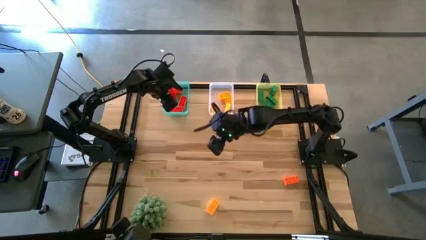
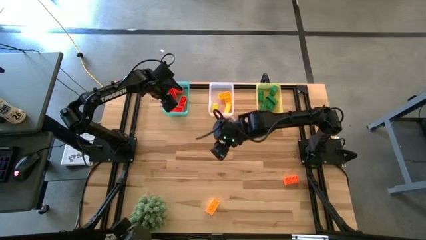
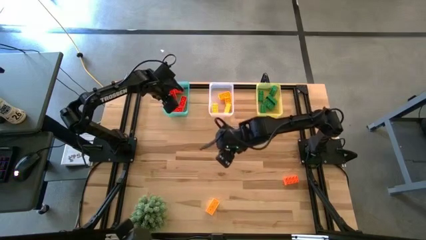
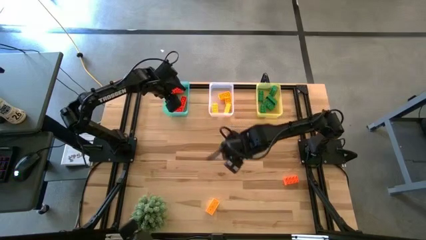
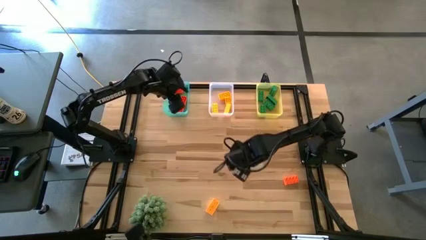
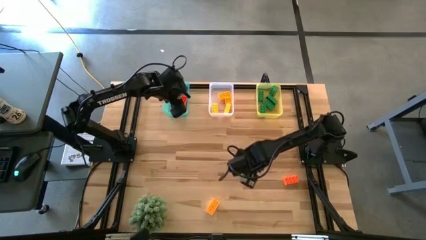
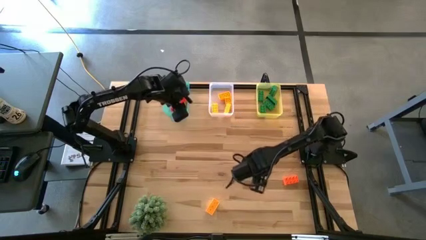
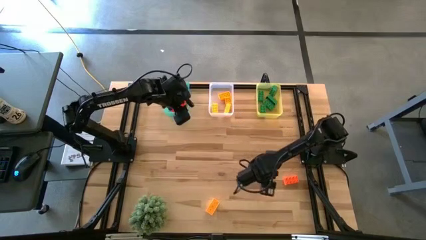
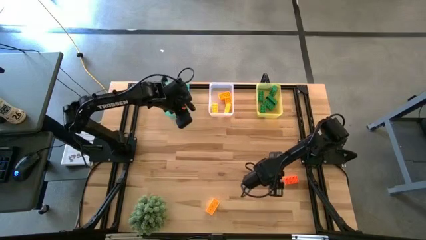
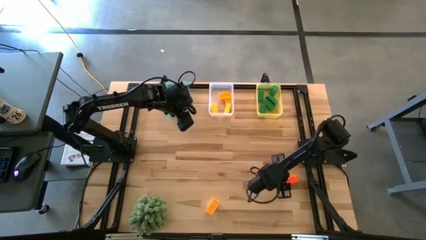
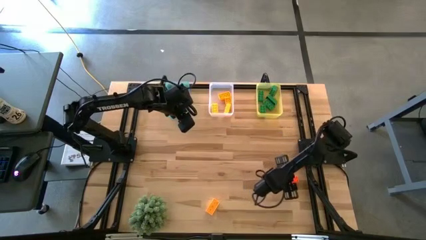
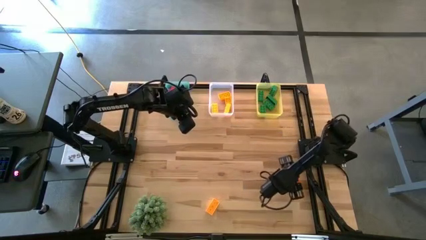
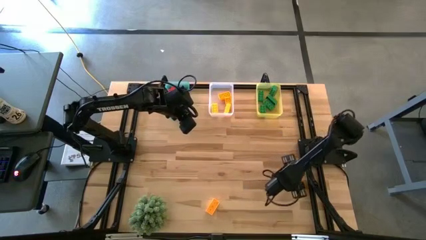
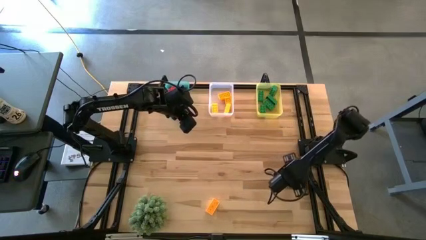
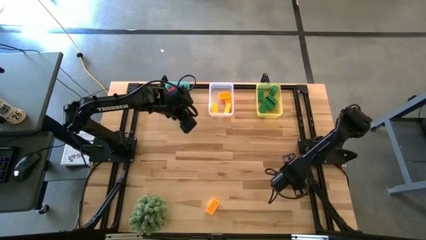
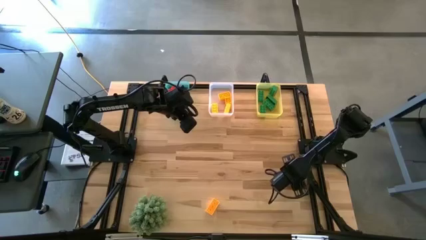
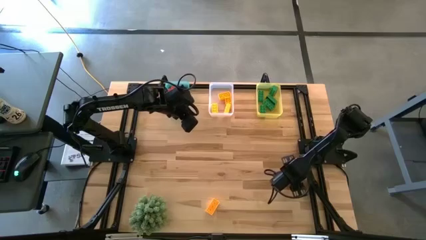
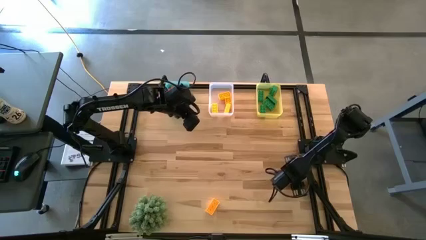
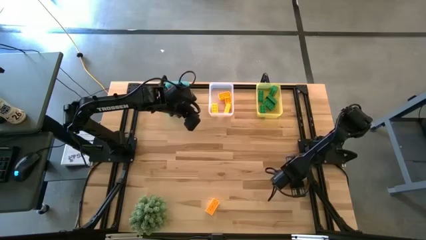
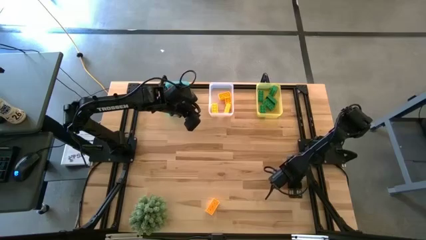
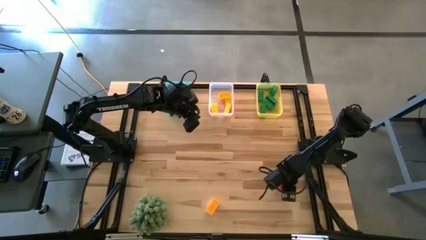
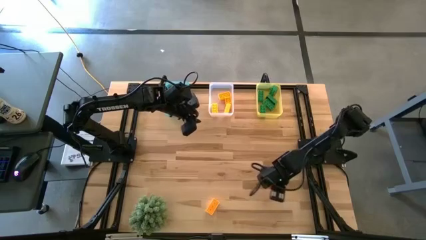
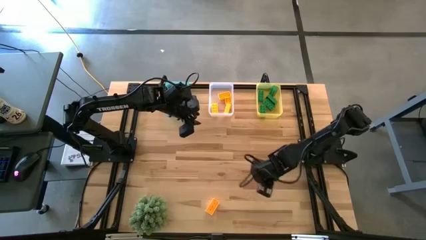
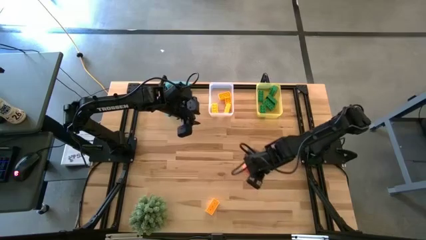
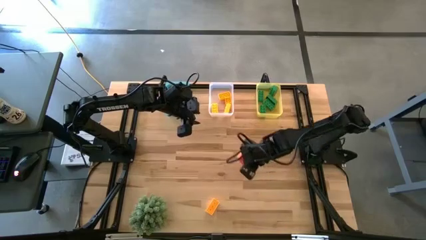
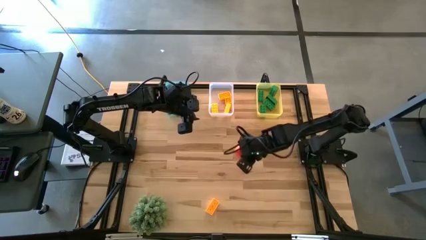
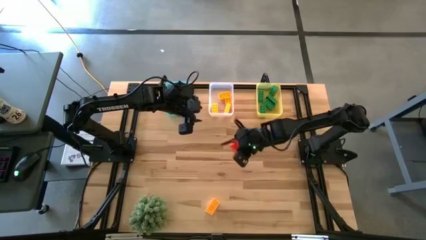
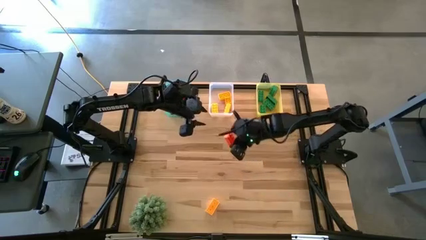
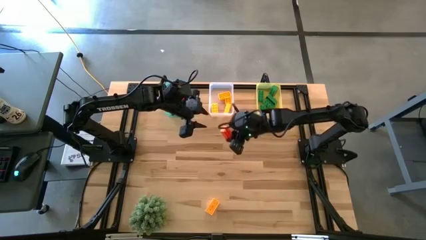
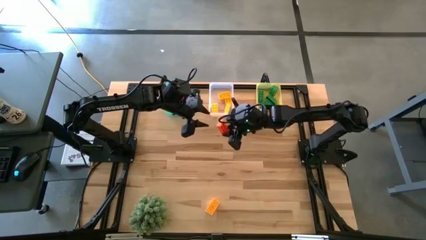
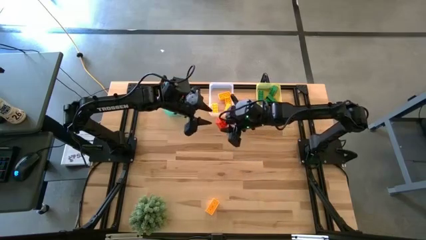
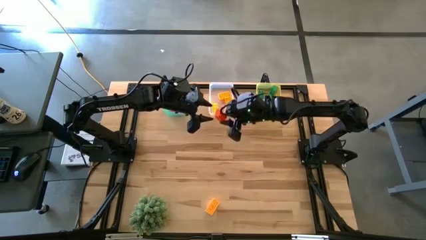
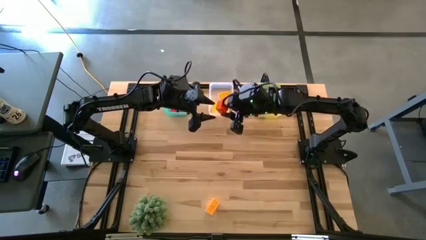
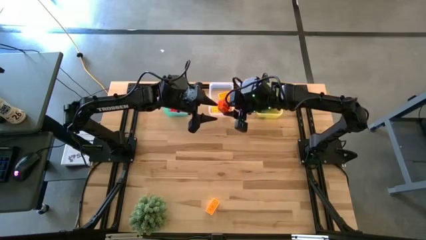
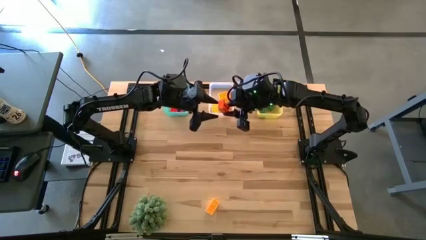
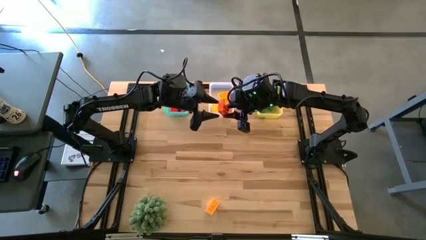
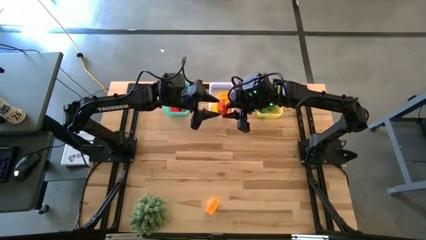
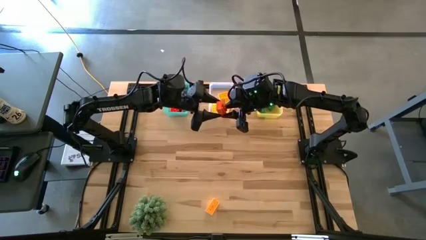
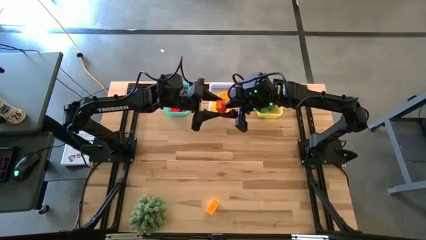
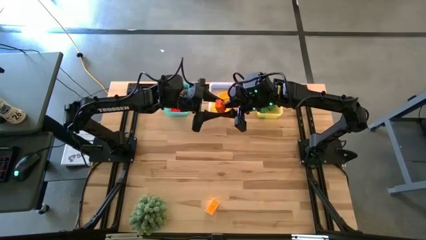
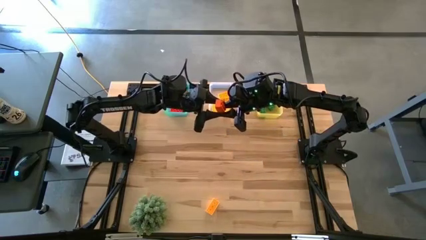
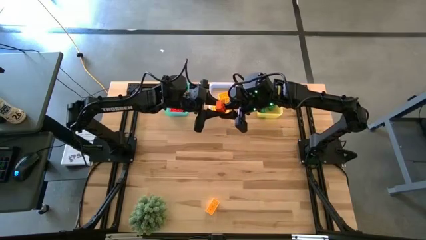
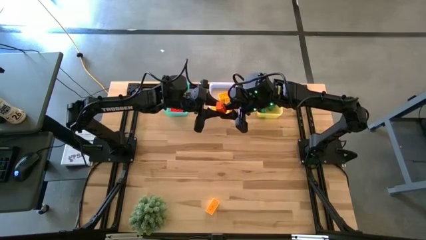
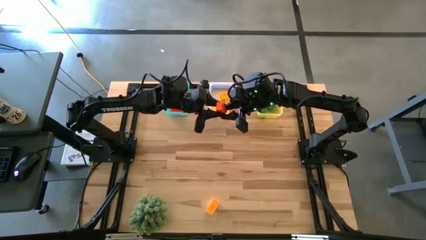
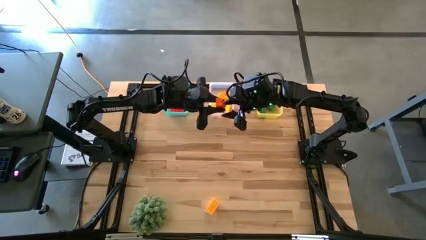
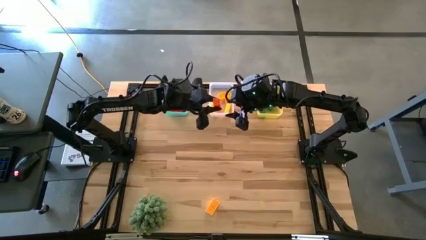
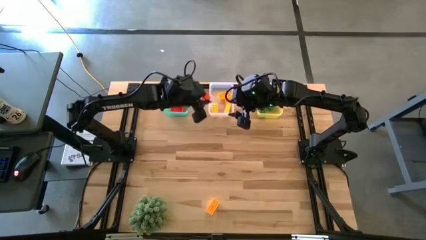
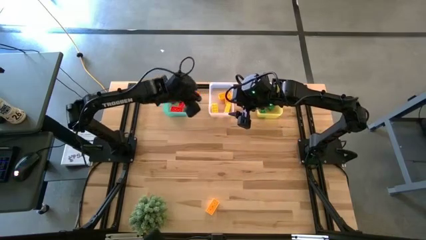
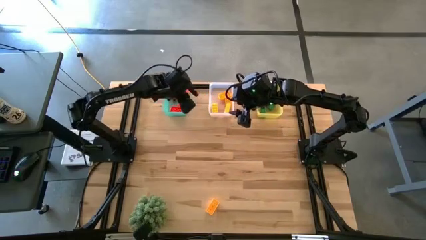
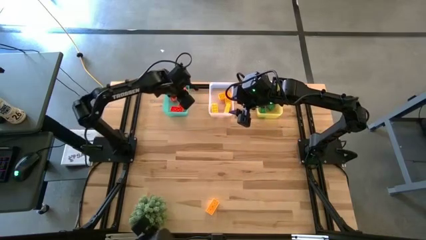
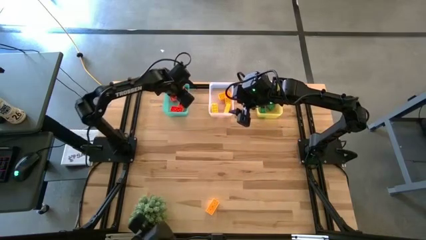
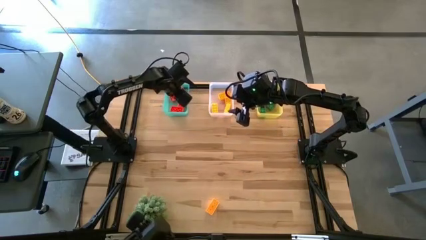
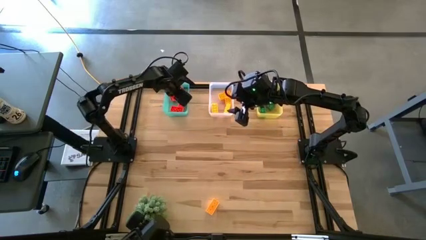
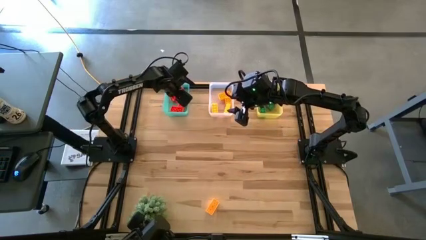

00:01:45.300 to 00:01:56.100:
Task: Sort & place blocks by color
Put the orange game piece into the blue bin

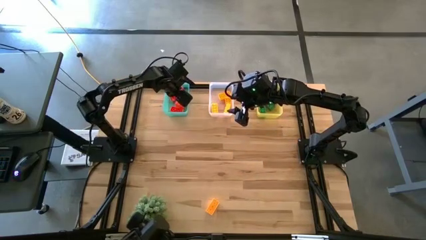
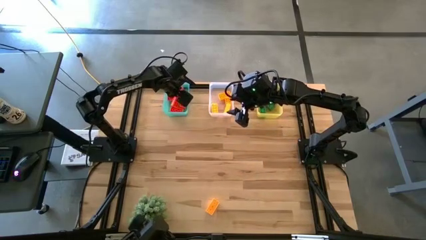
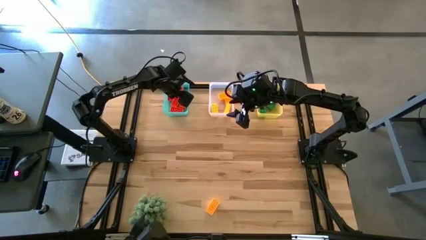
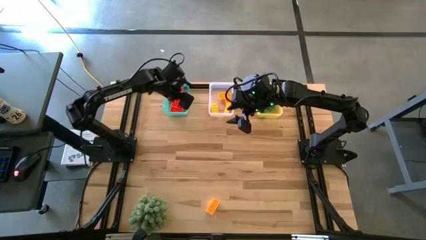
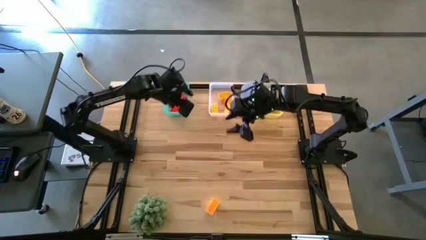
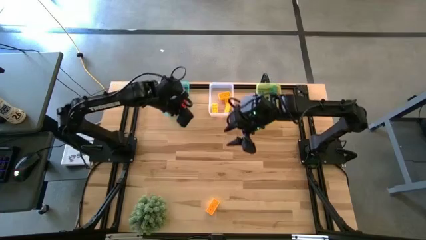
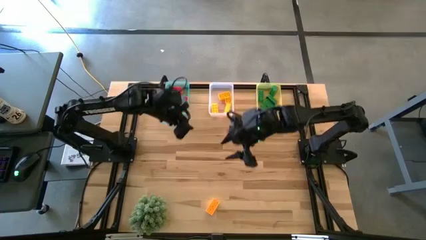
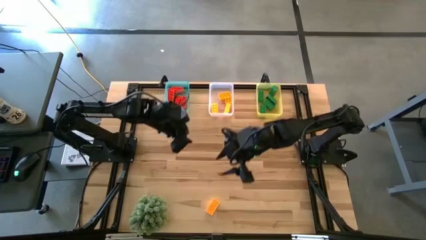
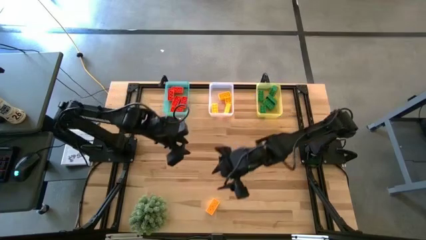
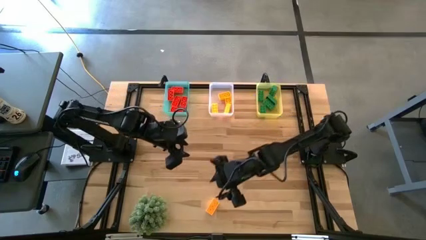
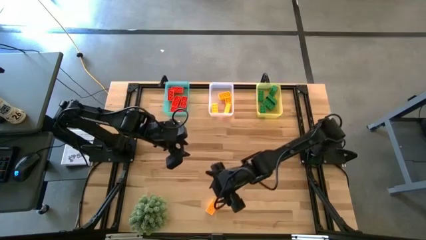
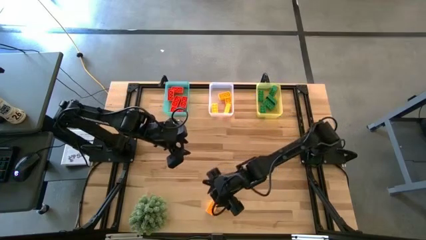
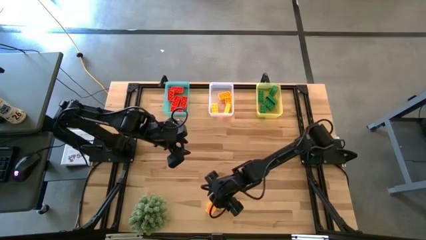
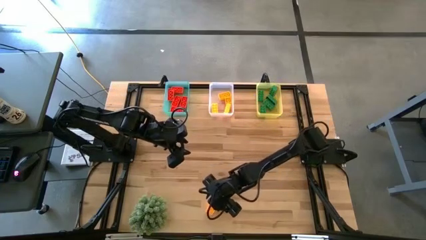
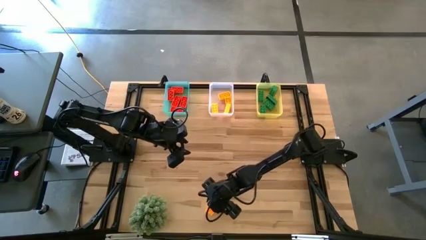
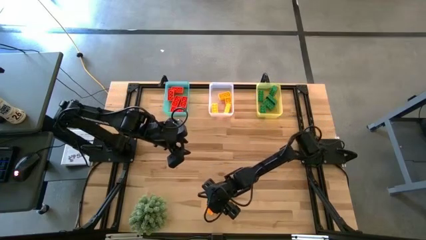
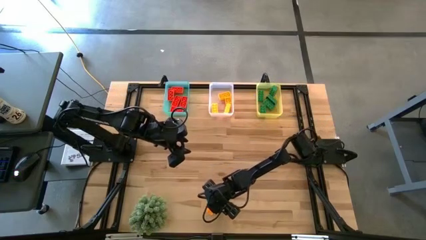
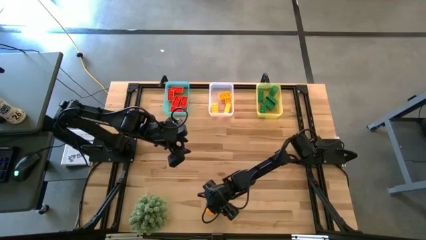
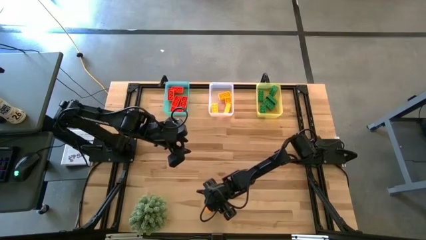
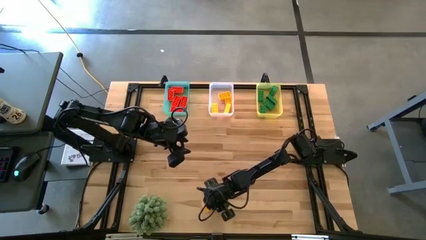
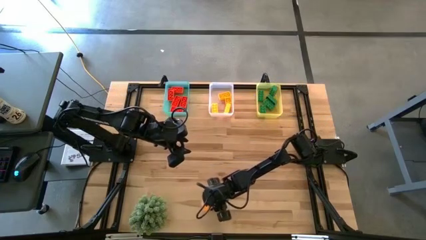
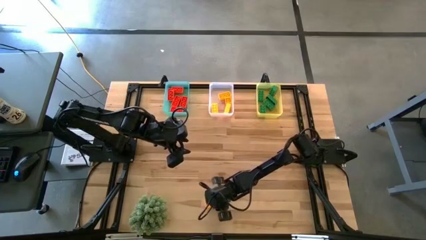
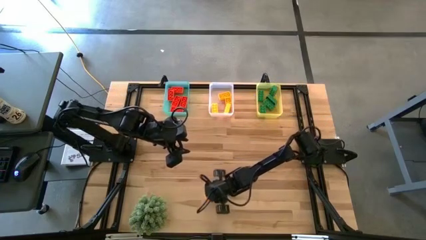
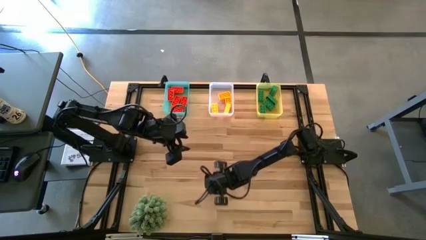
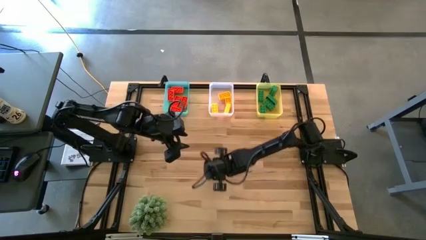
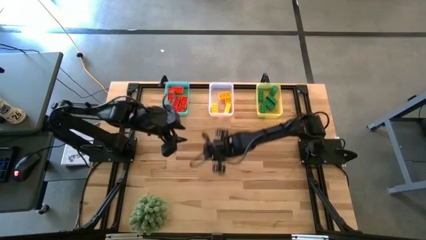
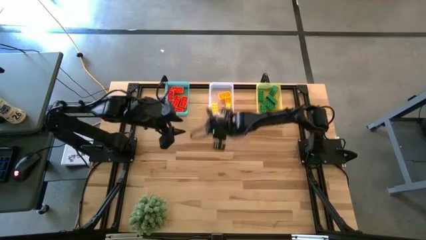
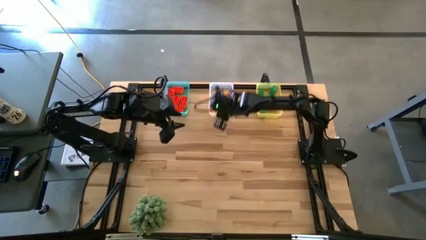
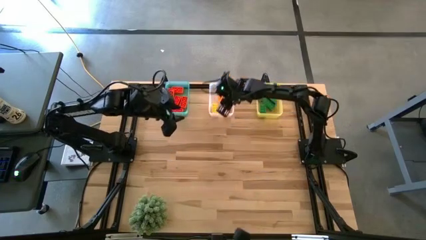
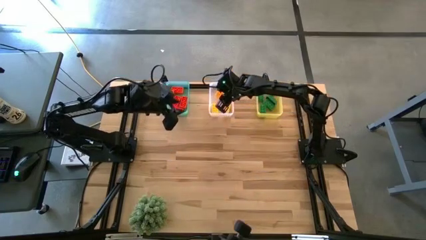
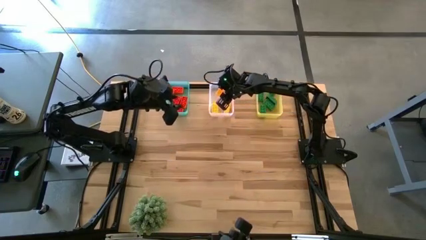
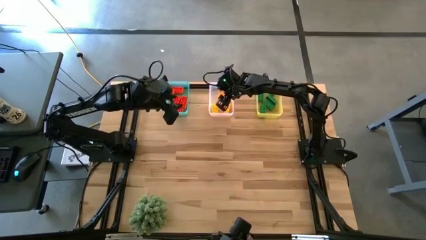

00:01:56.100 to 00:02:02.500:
Put the yellow game piece into the white bin
